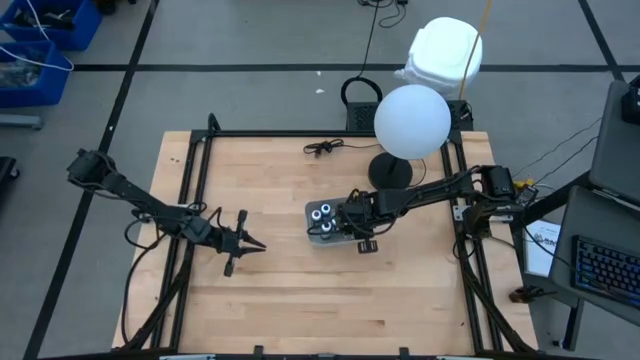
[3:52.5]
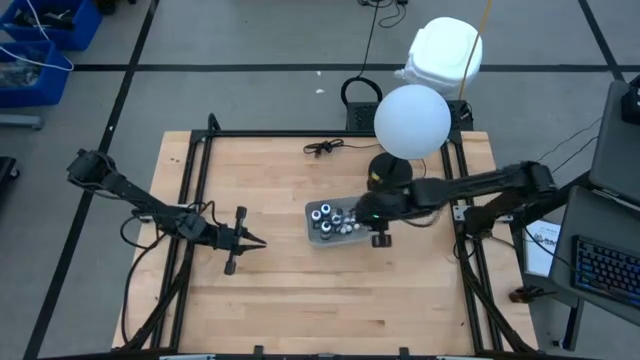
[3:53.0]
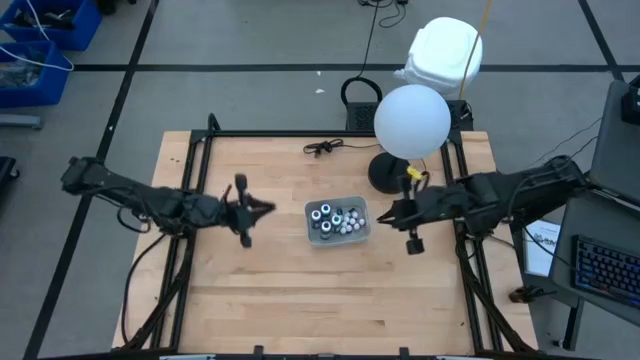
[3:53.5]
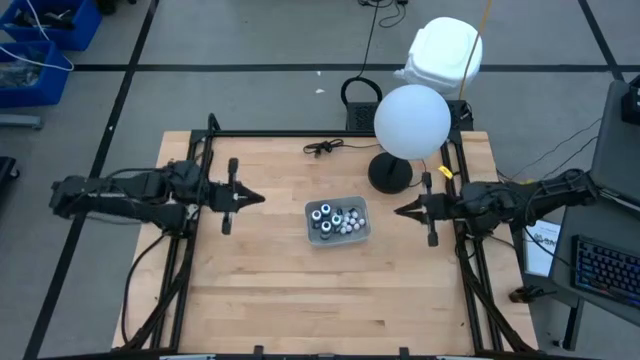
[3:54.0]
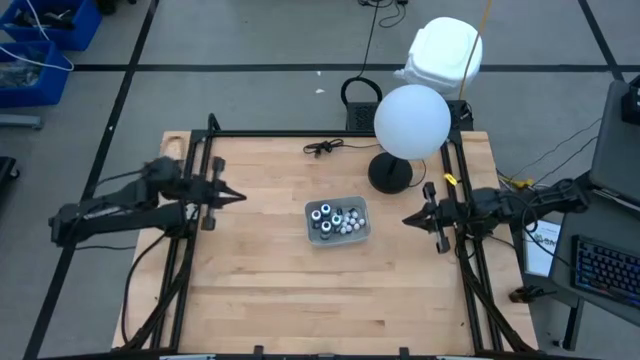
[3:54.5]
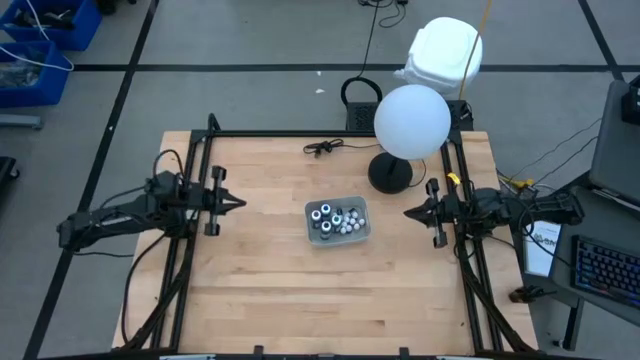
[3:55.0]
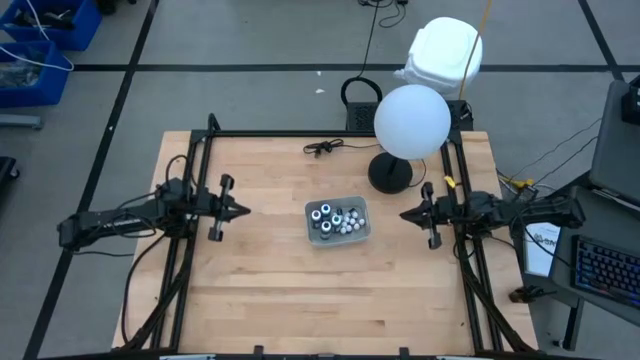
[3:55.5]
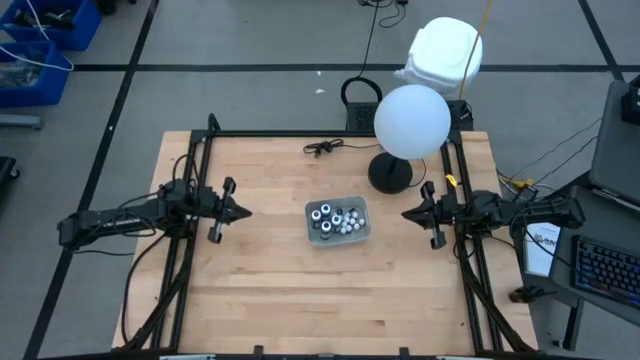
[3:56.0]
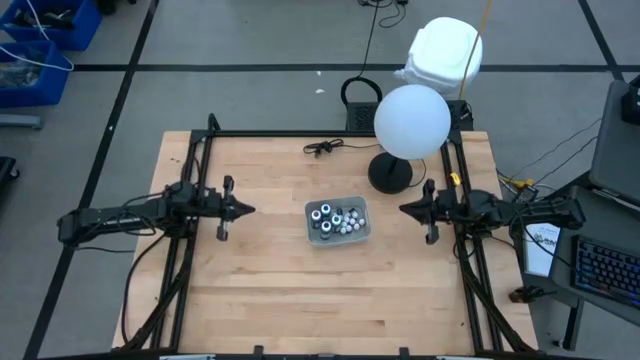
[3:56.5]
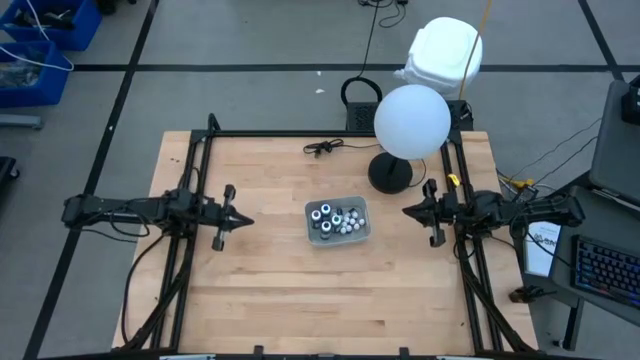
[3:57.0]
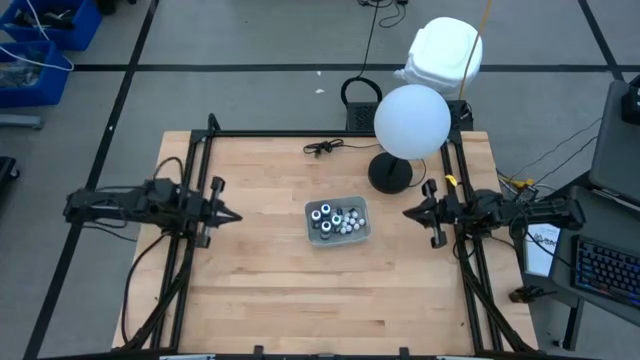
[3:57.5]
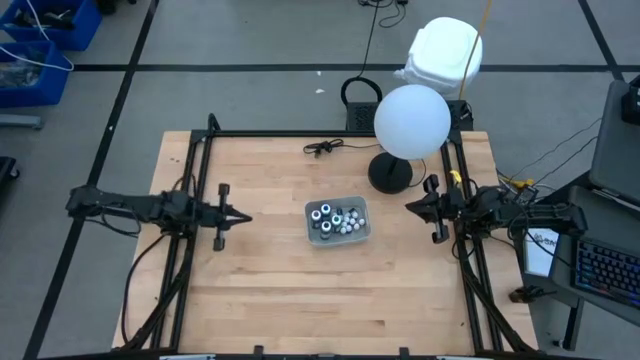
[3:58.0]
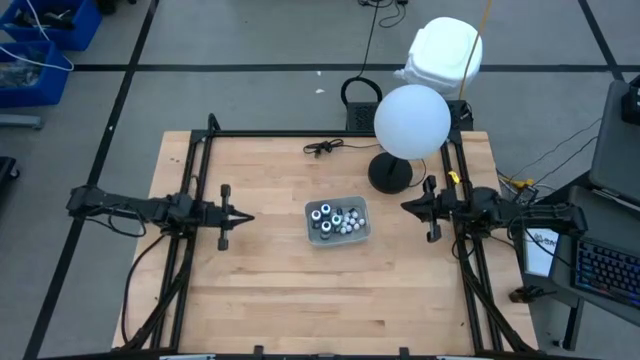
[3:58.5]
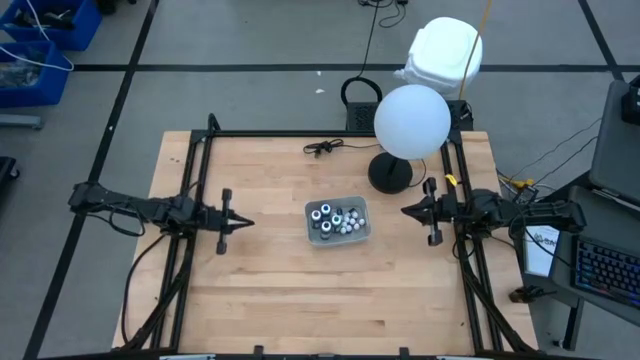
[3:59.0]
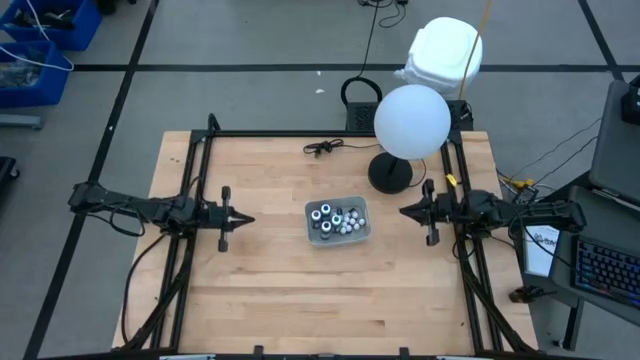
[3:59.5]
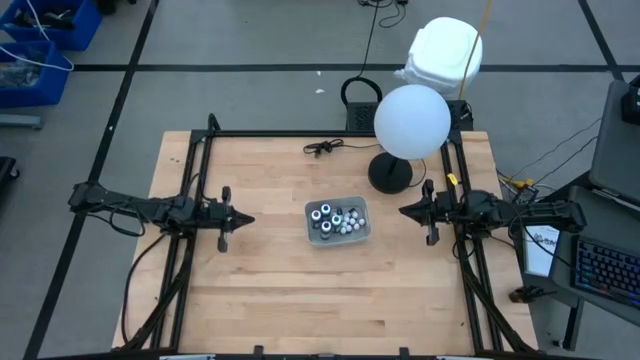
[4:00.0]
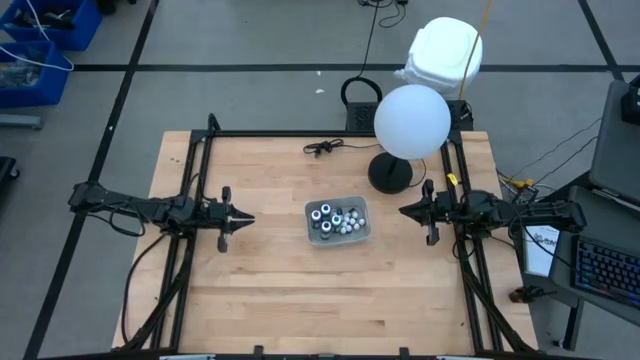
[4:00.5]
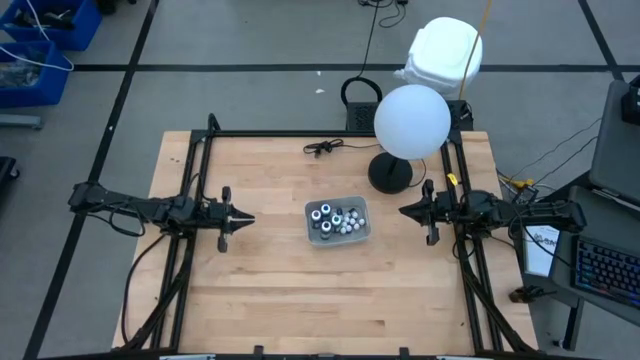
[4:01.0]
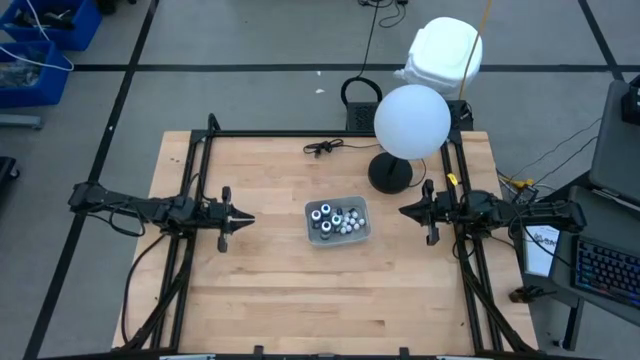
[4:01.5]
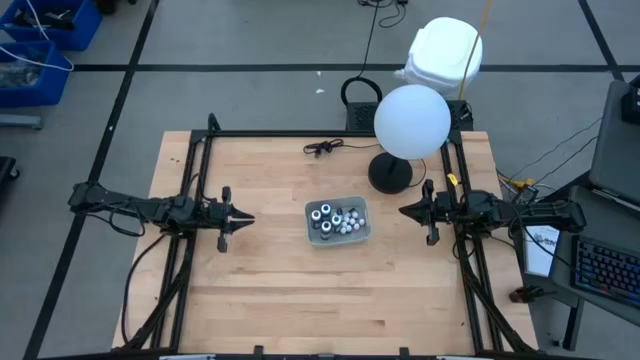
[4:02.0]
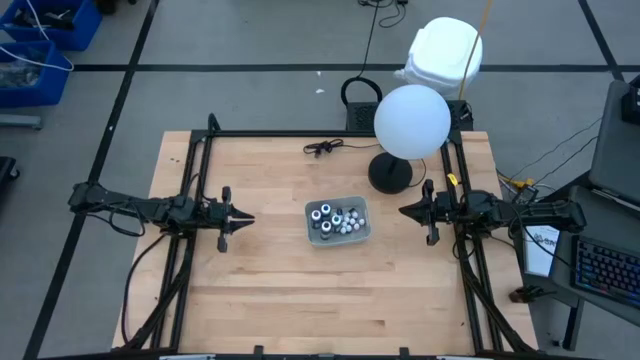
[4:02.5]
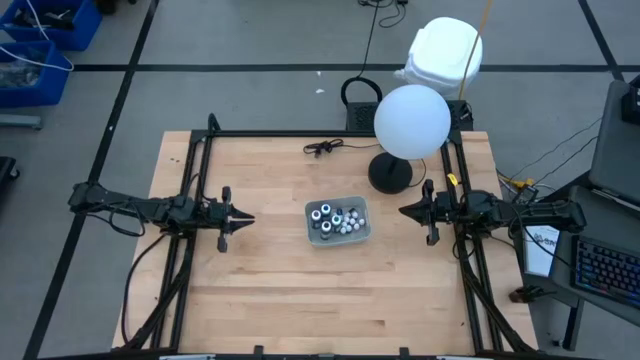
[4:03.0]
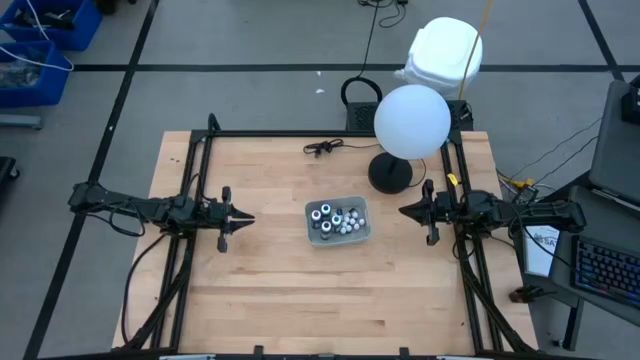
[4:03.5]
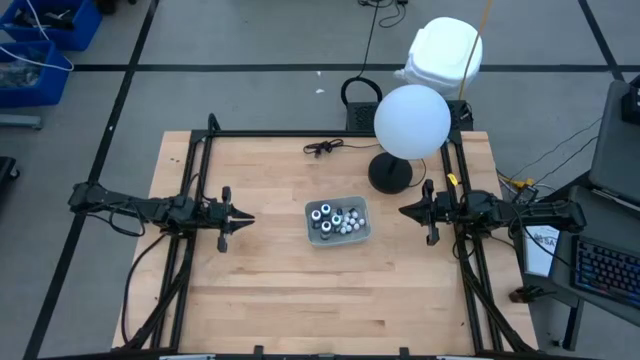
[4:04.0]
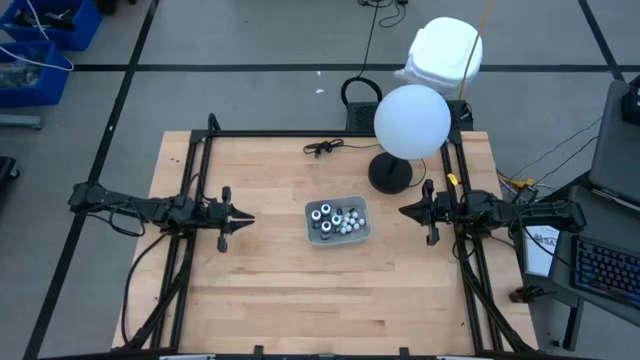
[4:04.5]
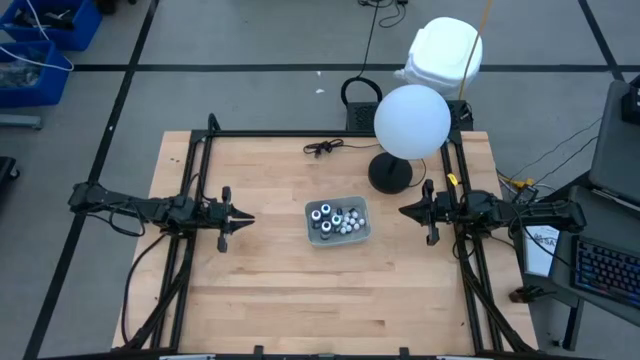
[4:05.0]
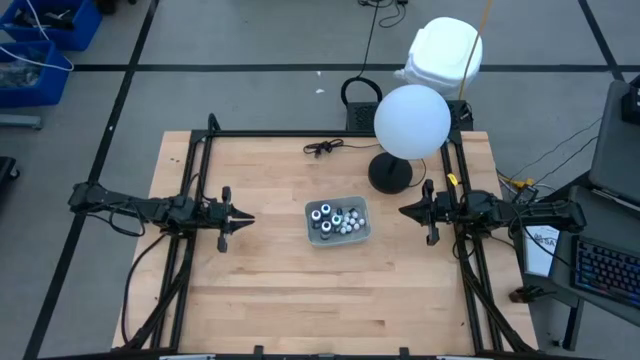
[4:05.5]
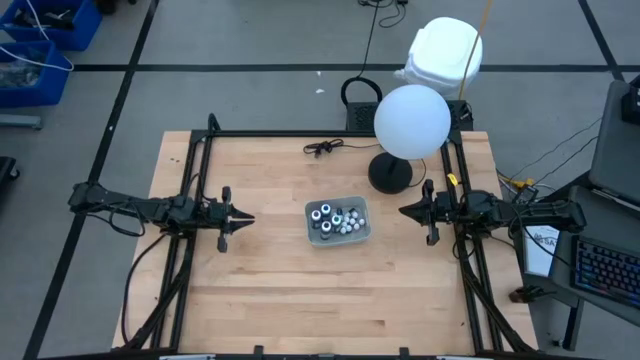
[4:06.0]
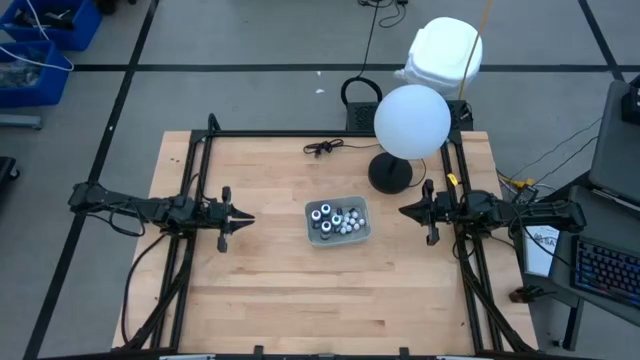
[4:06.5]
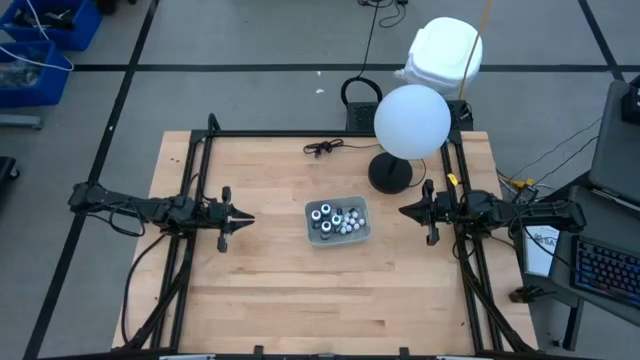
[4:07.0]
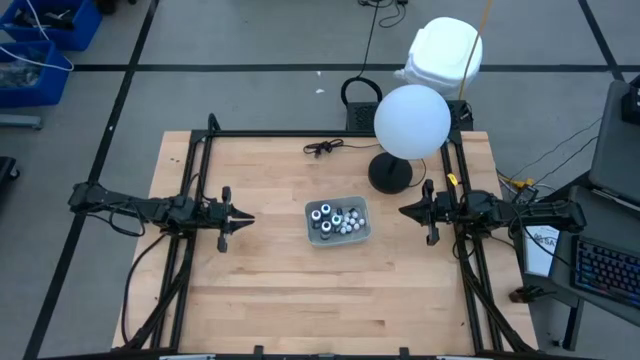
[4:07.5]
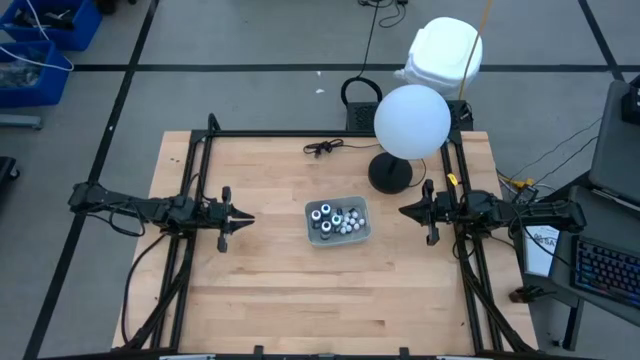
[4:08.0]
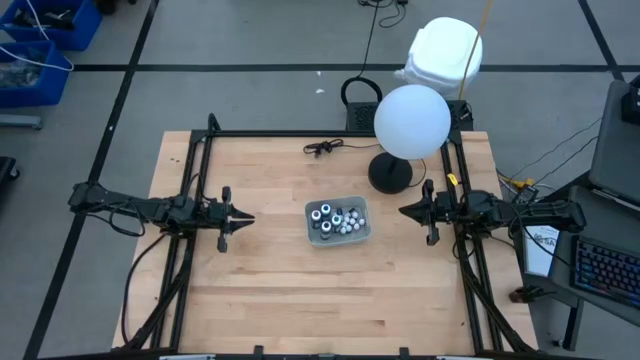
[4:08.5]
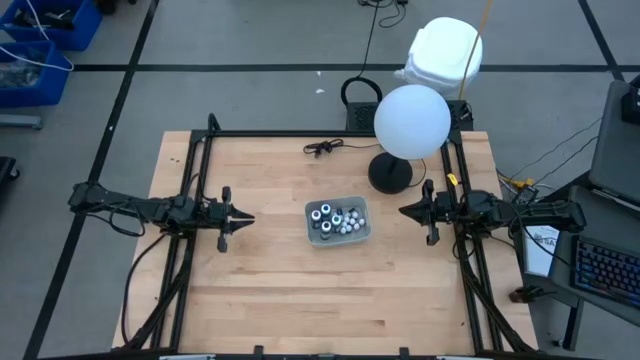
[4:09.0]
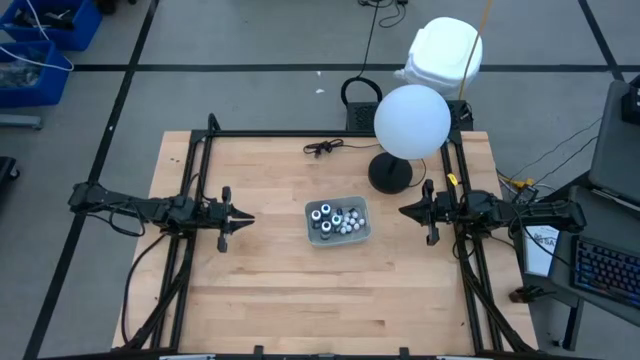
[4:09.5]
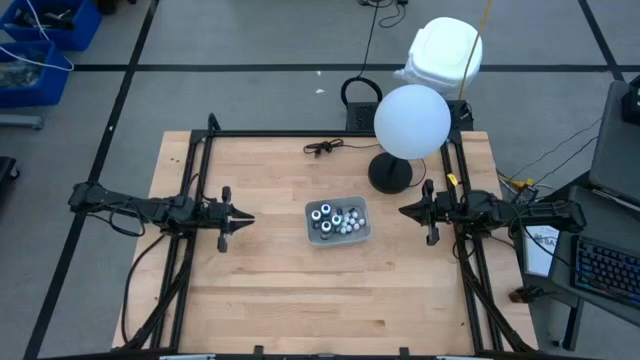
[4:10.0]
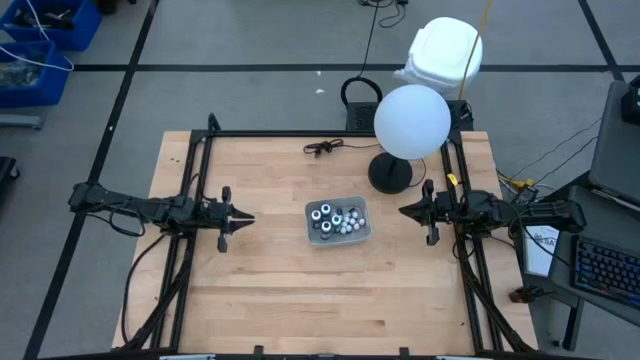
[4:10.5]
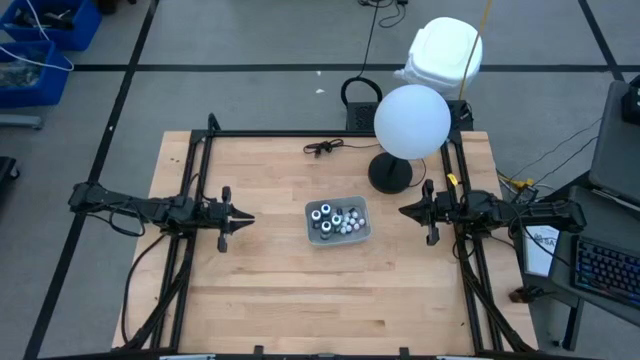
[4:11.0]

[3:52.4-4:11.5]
Task: Pick & Place food coloring
Return to Home Position

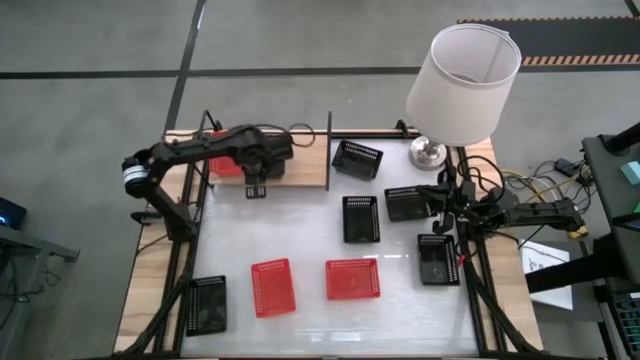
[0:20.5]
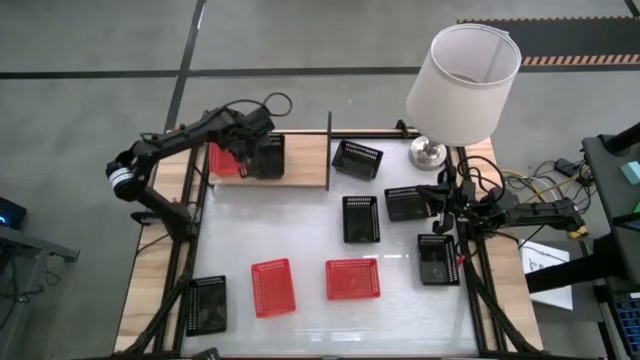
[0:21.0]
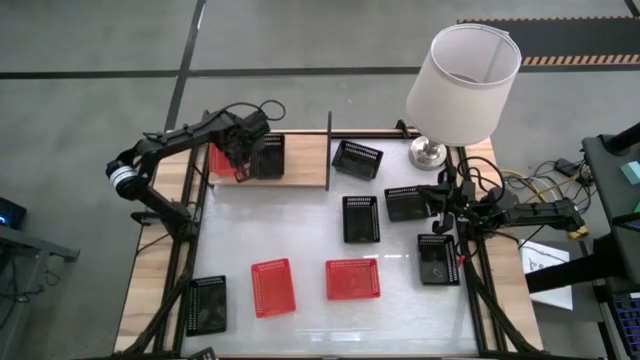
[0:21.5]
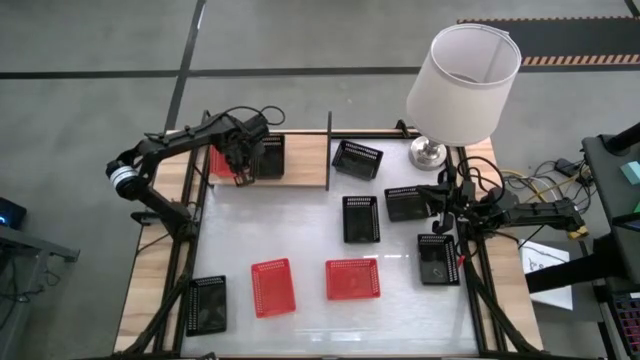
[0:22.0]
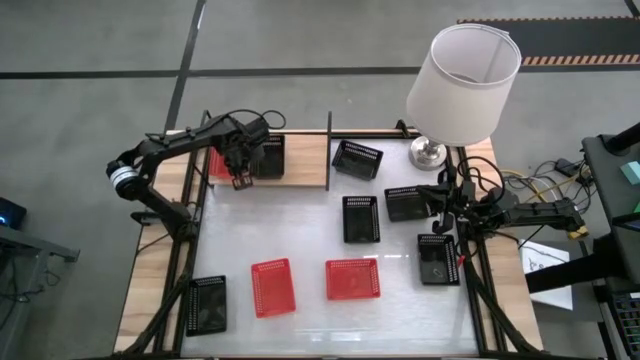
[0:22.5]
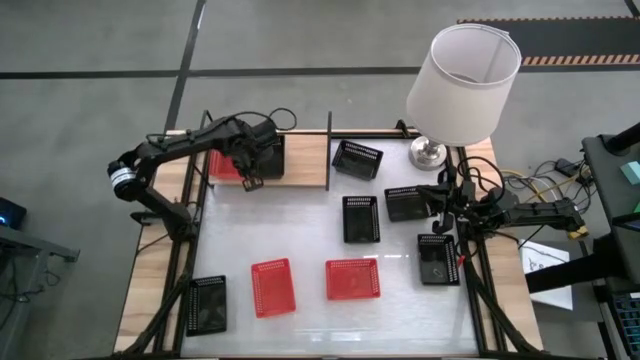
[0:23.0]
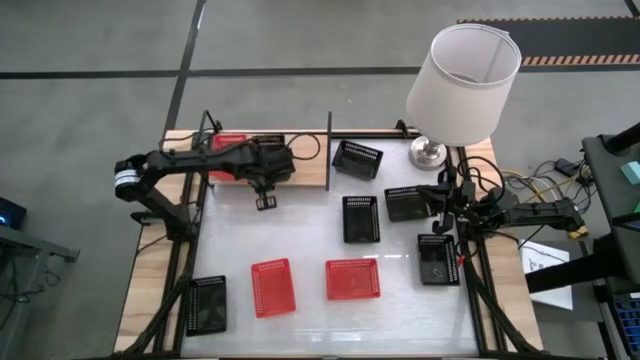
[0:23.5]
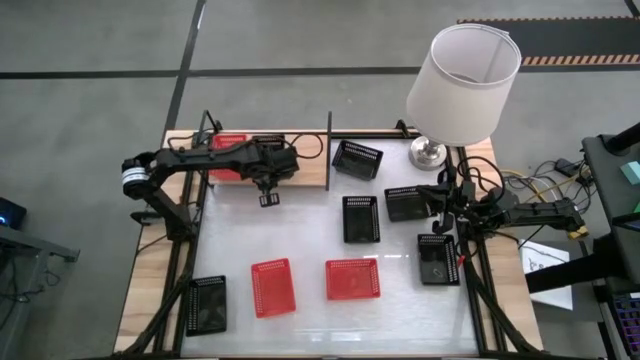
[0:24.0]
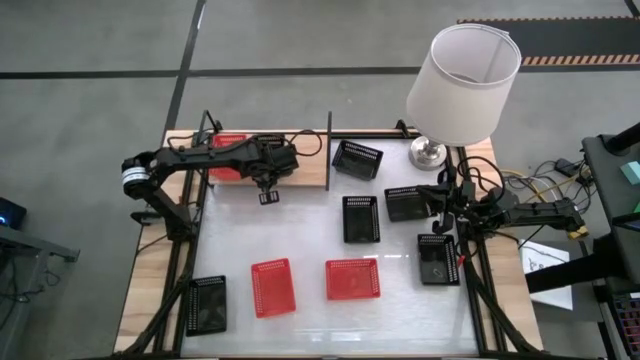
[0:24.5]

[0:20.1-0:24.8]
Task: Stack baskets on shelf by color
Adjust the baskets on the shelf
